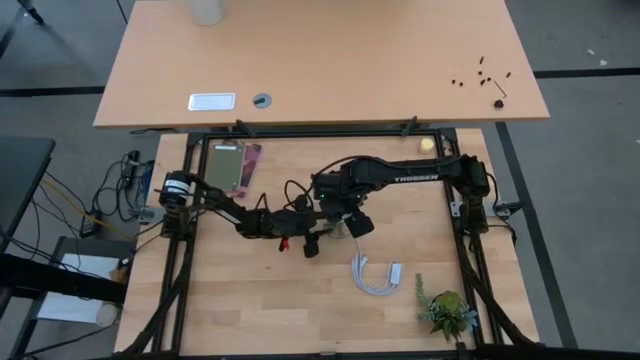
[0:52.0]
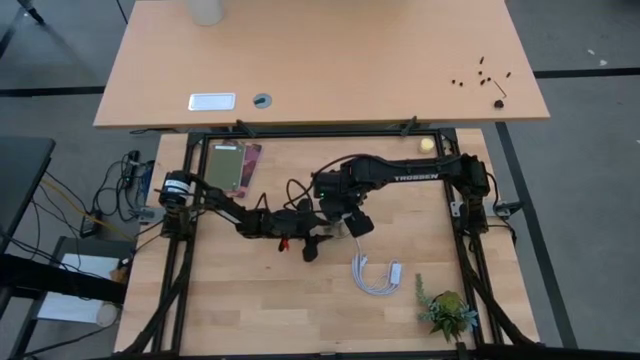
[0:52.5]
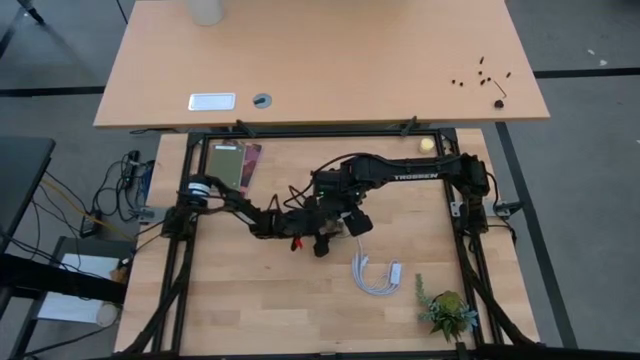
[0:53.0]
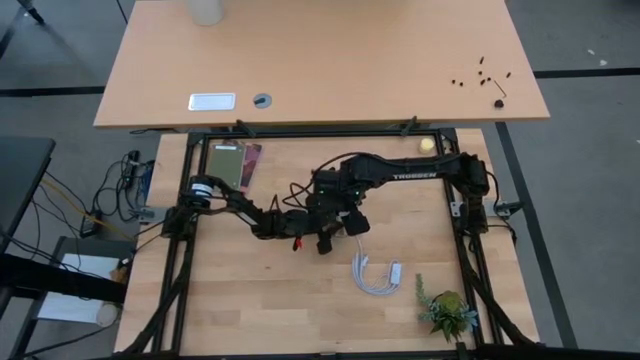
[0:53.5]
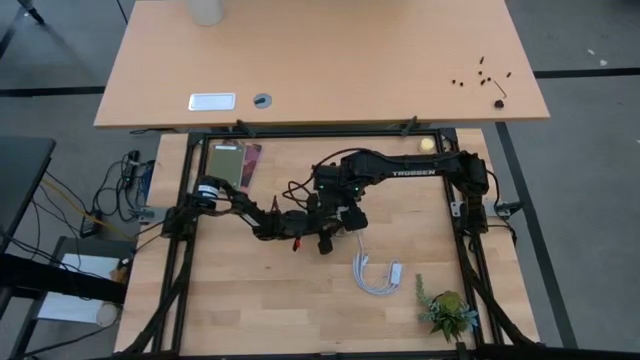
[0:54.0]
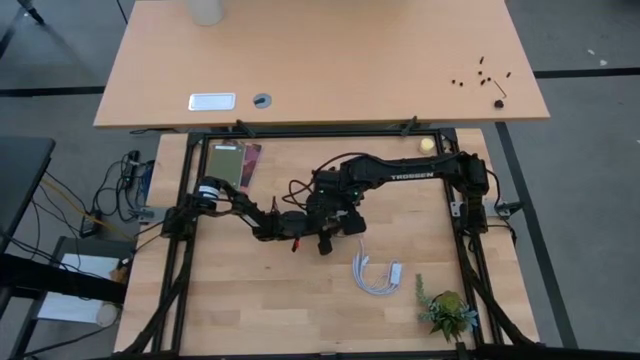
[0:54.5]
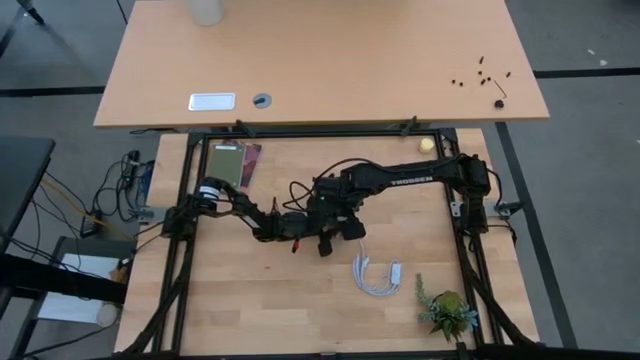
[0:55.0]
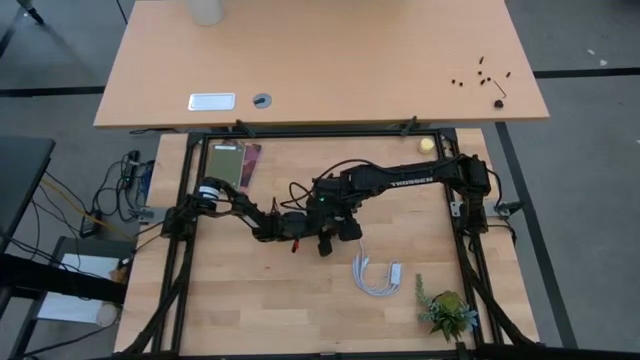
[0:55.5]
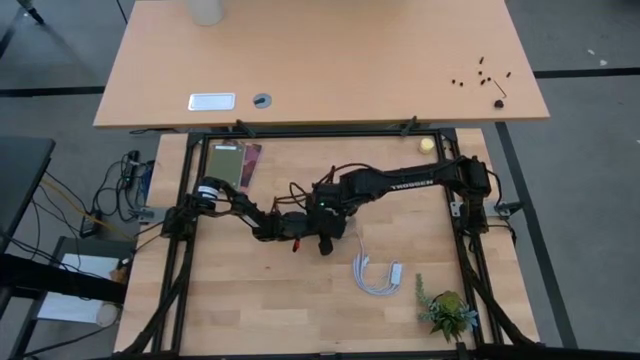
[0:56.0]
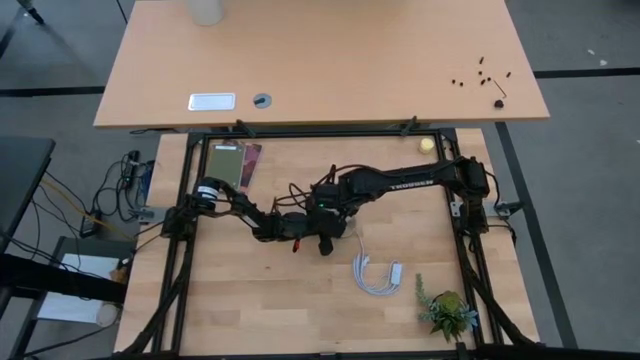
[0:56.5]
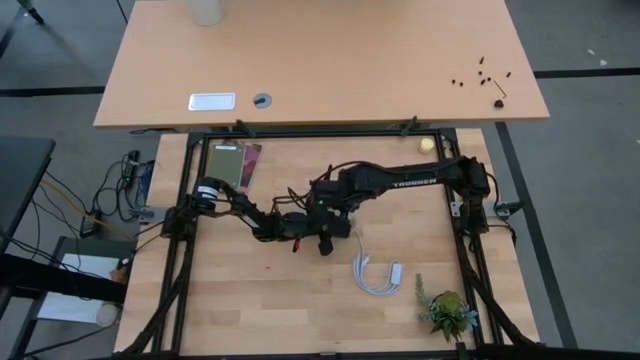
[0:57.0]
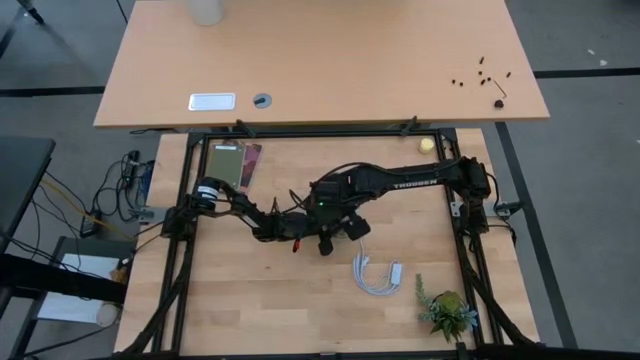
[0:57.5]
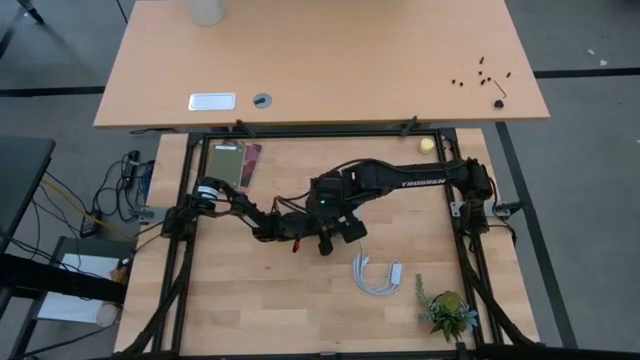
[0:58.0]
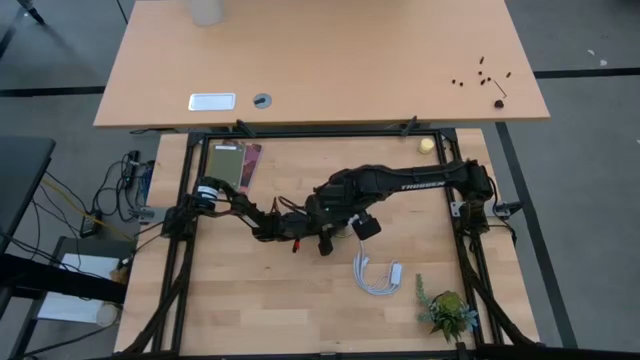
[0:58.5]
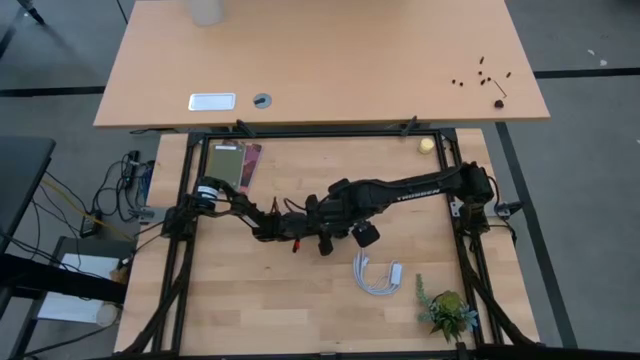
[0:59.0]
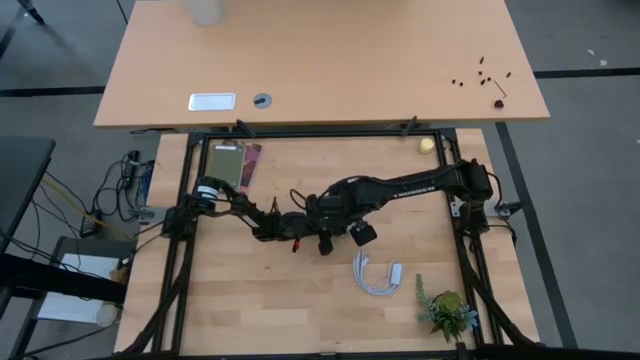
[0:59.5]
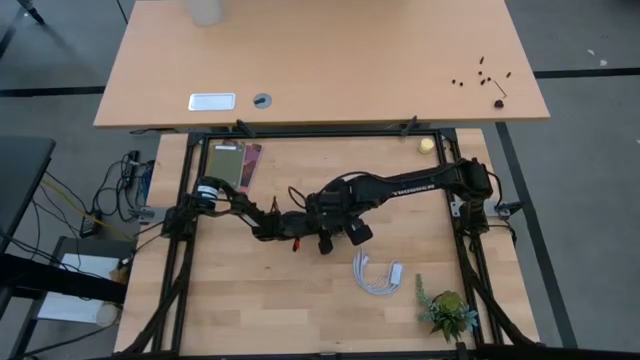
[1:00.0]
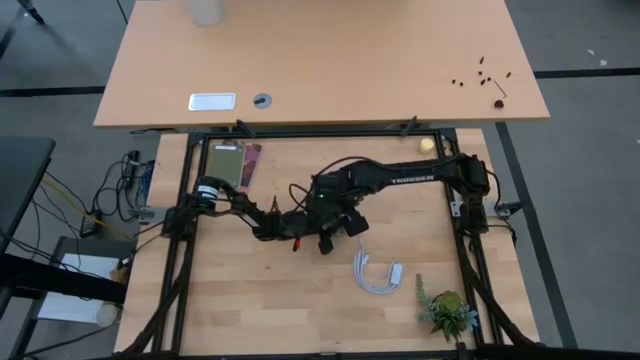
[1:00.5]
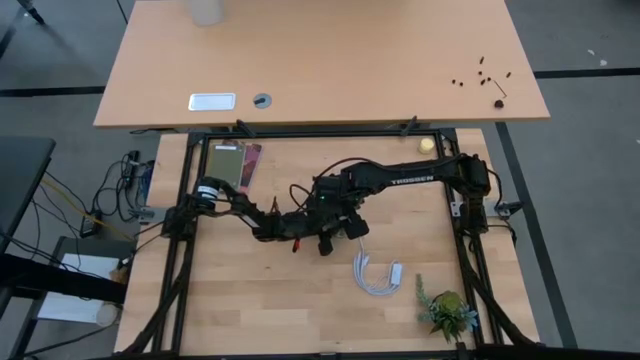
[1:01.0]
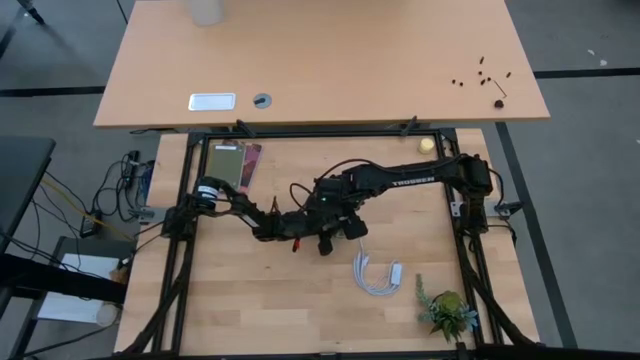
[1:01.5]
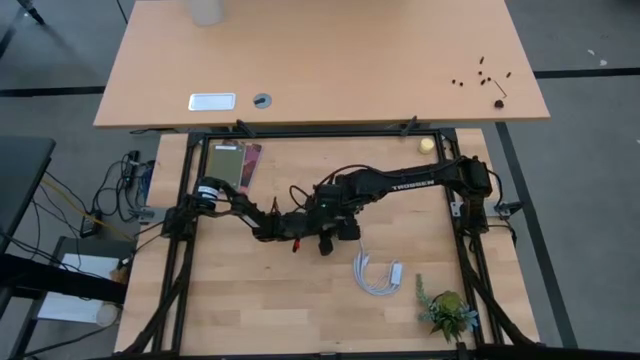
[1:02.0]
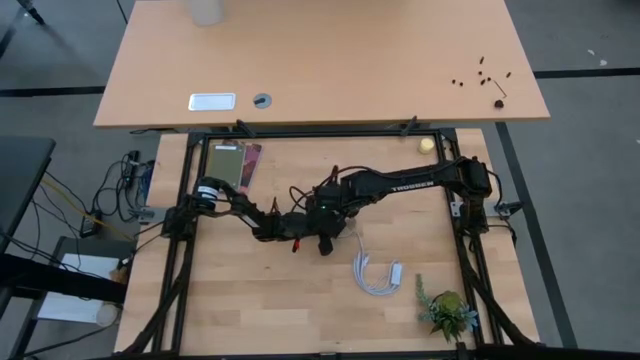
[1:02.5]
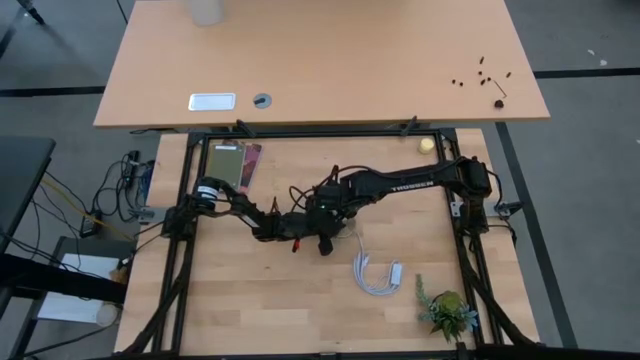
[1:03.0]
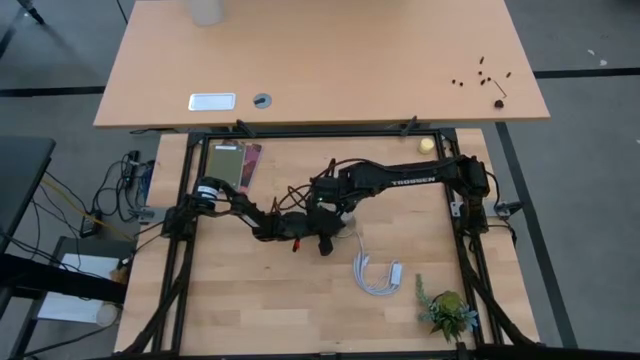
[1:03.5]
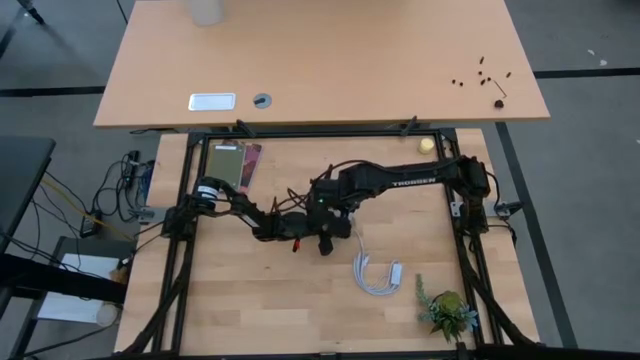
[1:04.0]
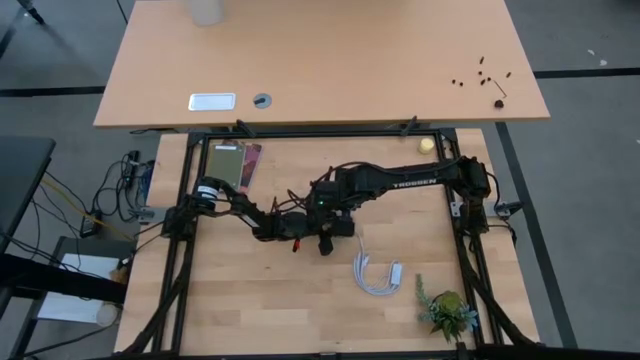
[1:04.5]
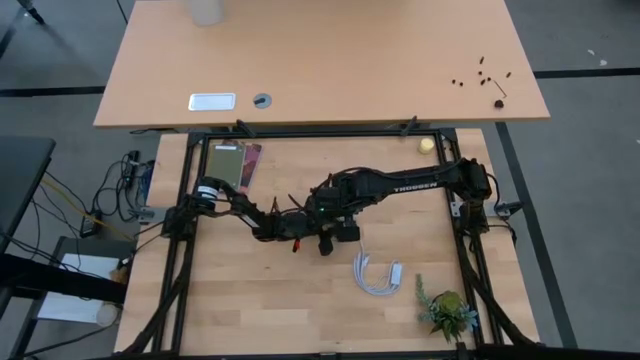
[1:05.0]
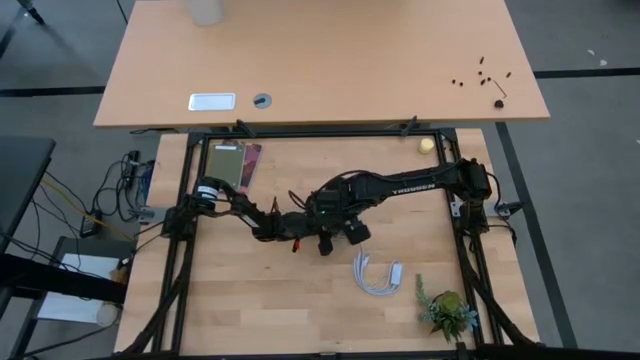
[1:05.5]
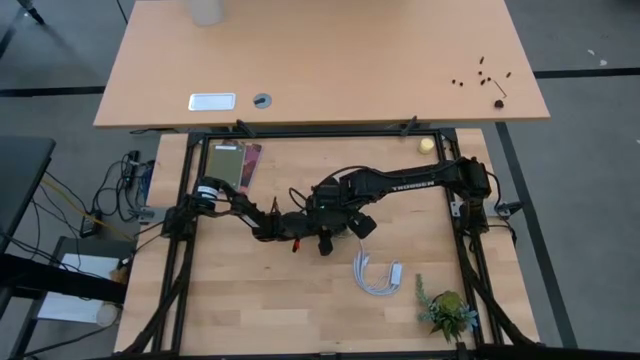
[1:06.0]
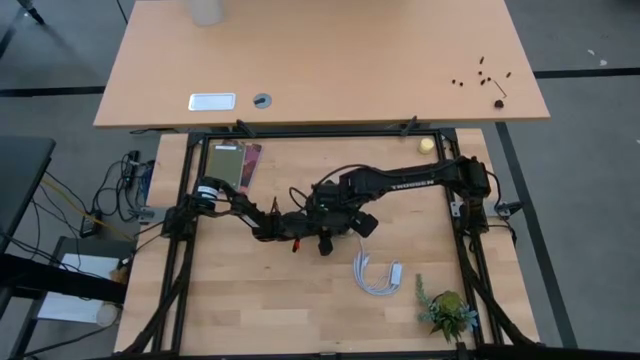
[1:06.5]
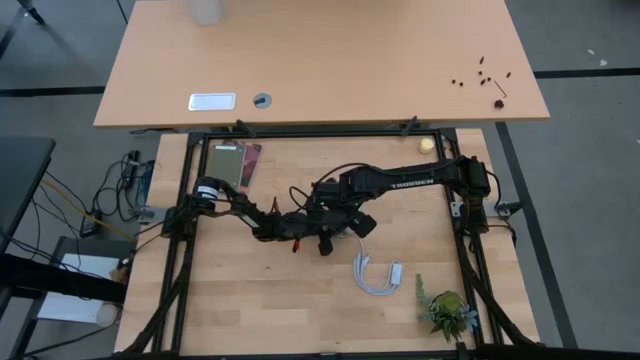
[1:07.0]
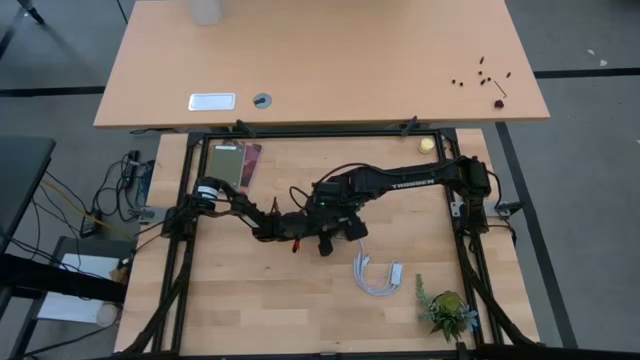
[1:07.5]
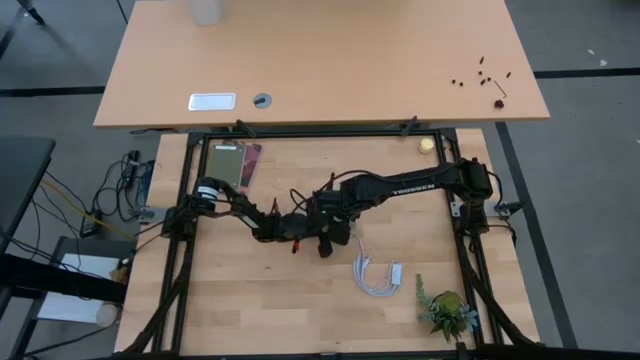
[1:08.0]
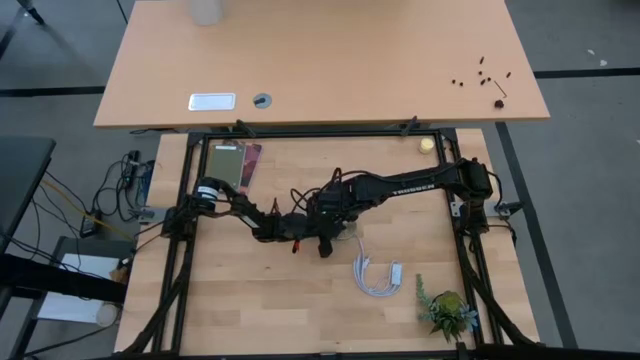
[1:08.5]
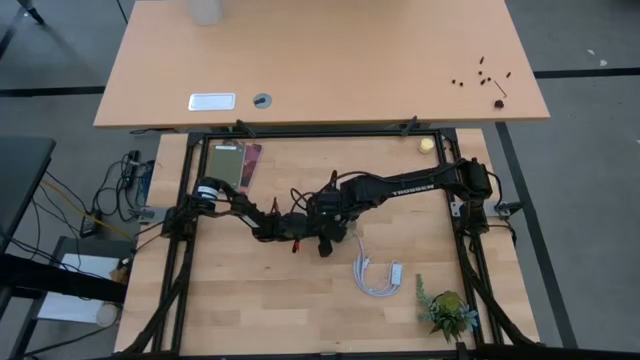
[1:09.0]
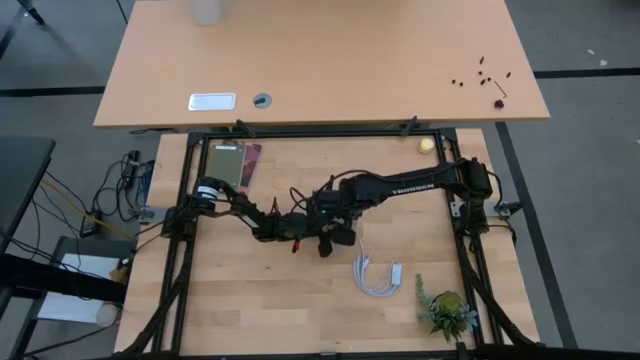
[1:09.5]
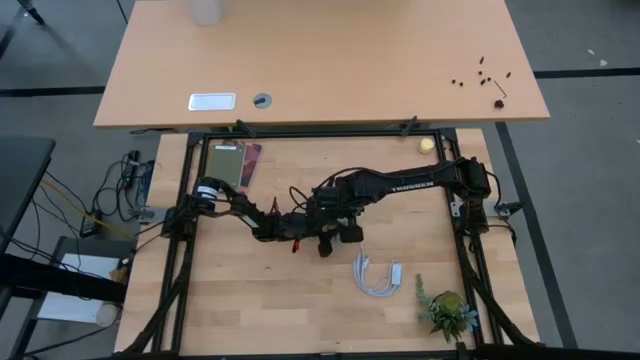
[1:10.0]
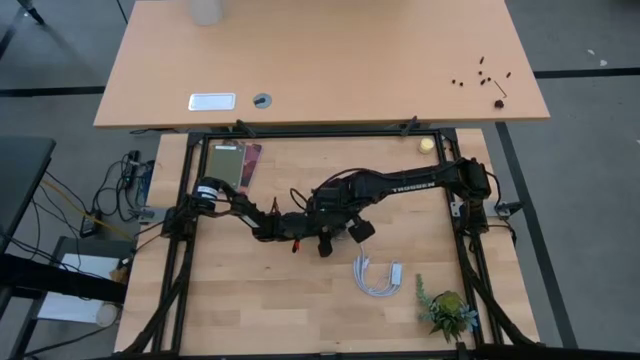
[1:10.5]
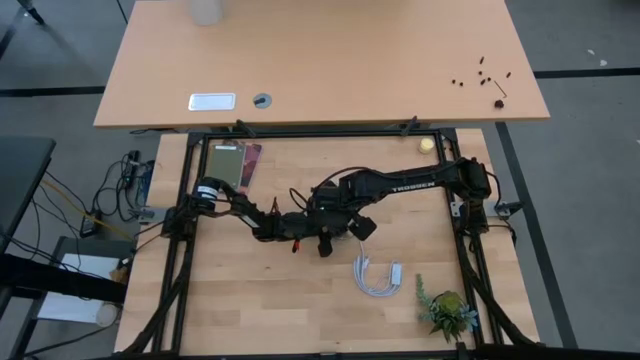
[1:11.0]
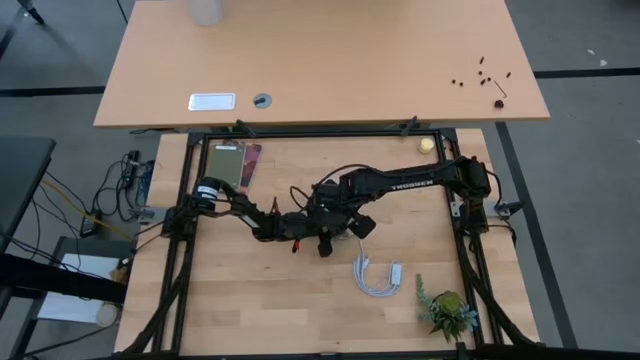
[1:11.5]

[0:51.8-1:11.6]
Task: Screw lightbulb
Insert the white lightbulb into the desk lamp

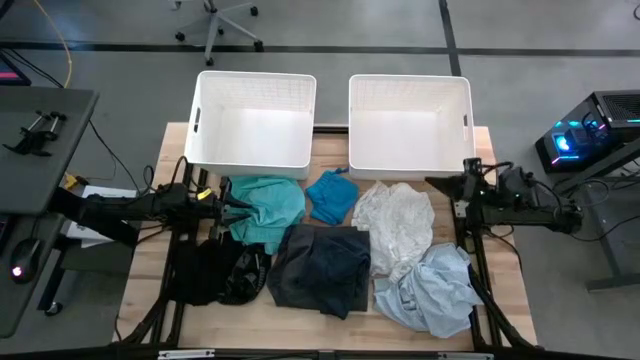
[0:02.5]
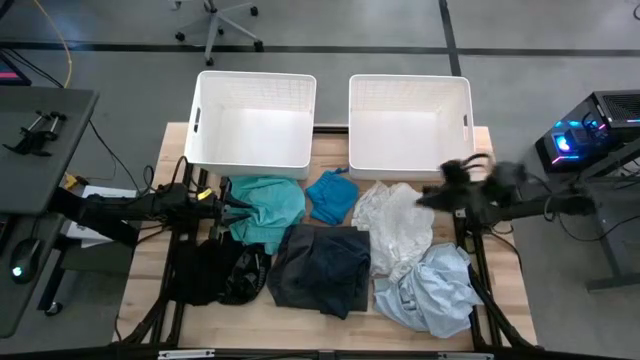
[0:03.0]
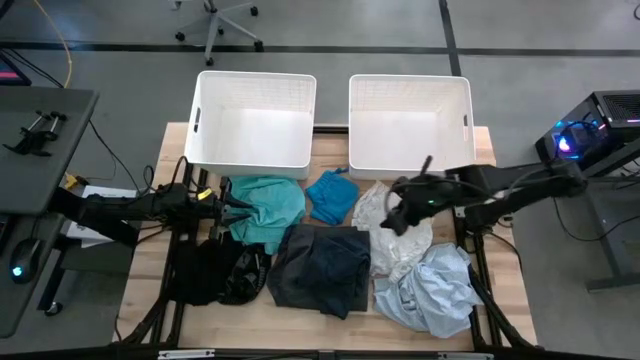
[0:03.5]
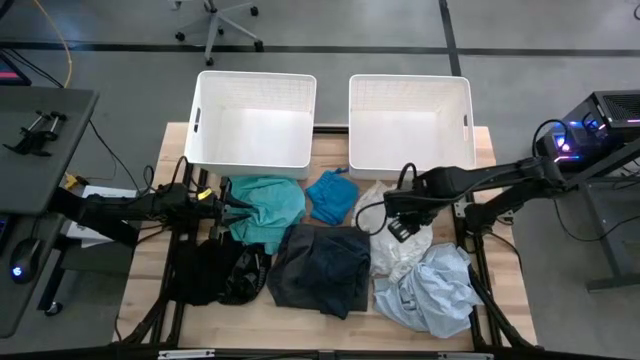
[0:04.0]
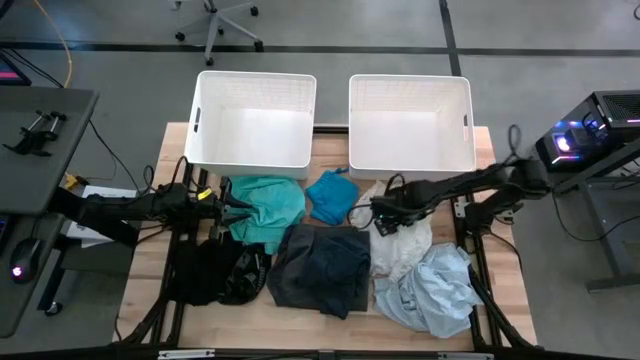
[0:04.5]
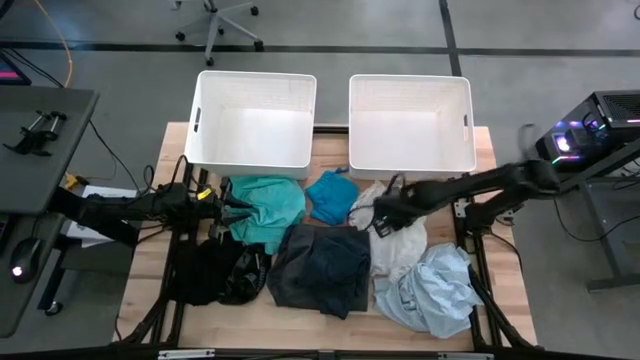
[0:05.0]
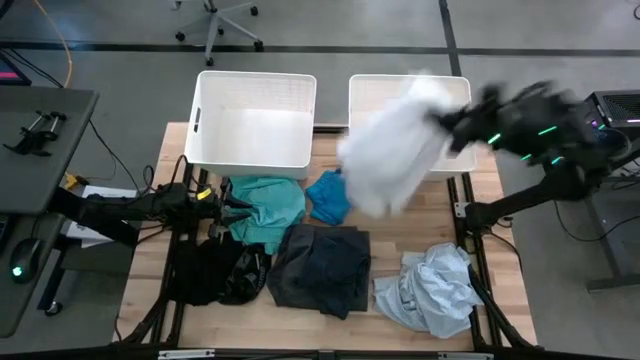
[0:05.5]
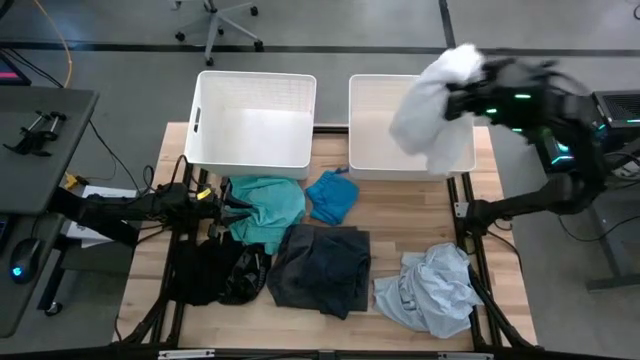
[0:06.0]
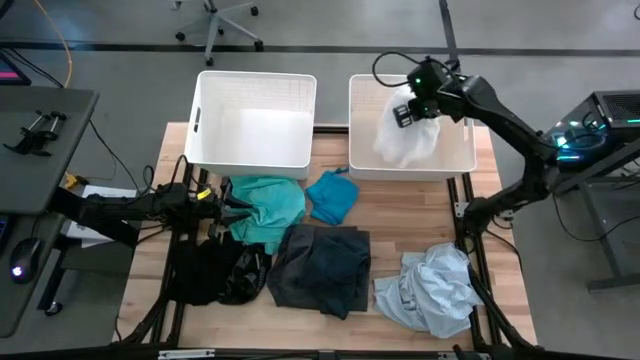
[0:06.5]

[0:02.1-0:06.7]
Task: Sort clothes
Put the white clothing into the right white bin
